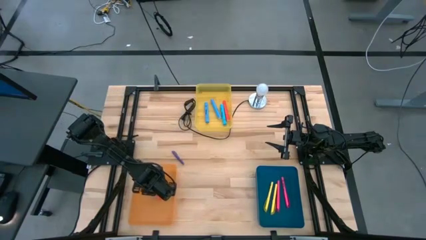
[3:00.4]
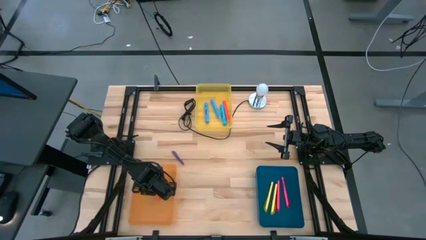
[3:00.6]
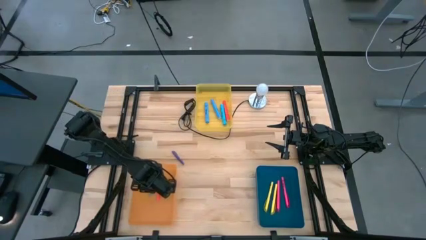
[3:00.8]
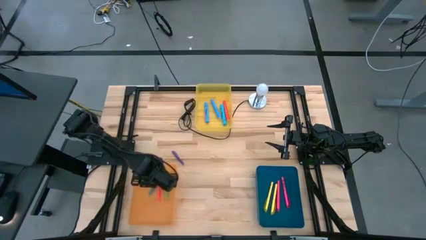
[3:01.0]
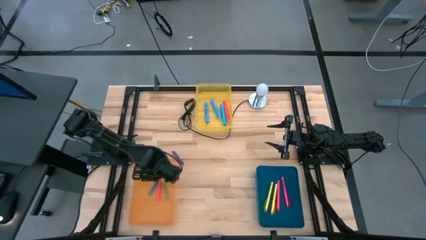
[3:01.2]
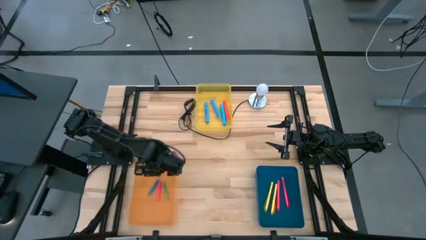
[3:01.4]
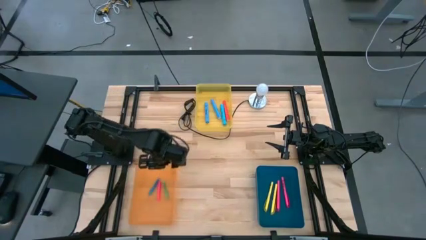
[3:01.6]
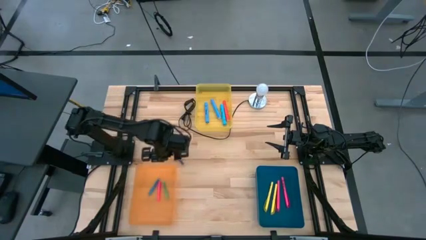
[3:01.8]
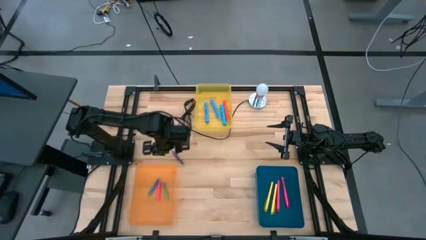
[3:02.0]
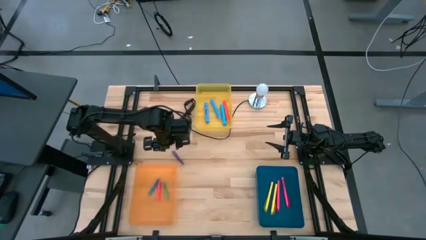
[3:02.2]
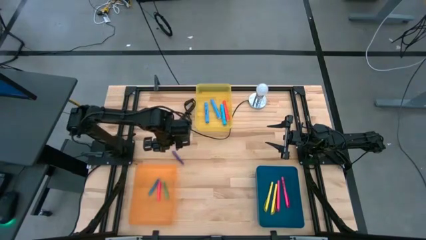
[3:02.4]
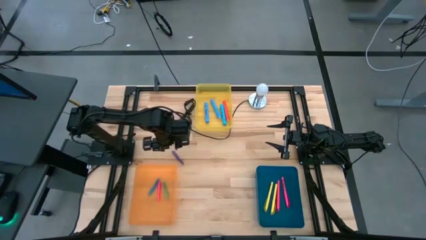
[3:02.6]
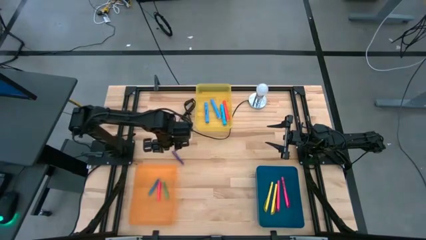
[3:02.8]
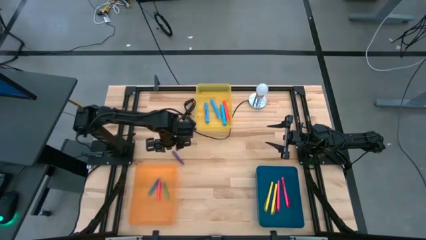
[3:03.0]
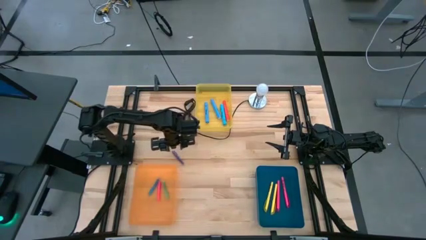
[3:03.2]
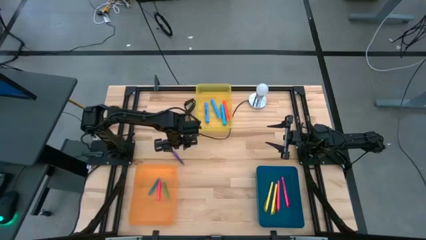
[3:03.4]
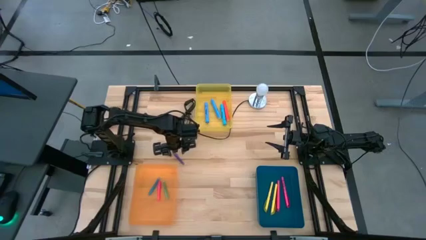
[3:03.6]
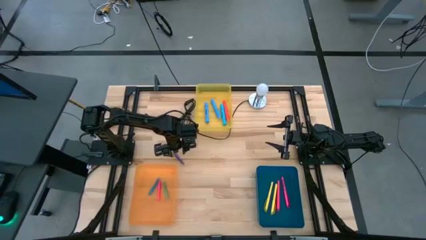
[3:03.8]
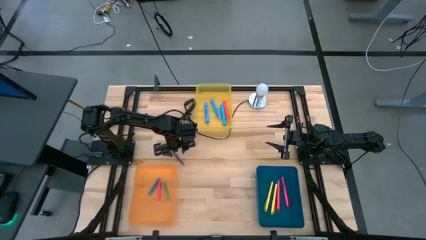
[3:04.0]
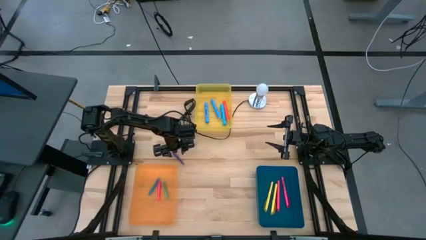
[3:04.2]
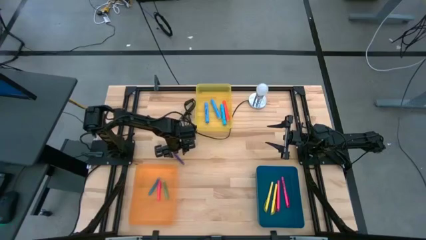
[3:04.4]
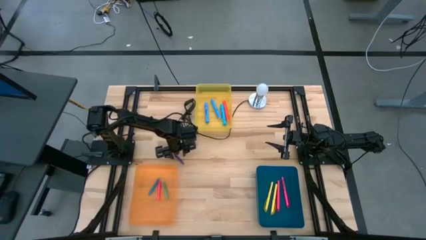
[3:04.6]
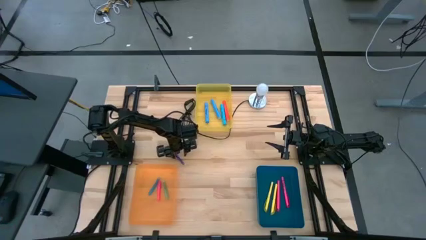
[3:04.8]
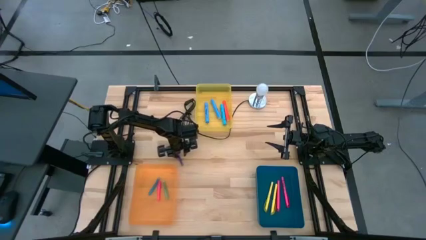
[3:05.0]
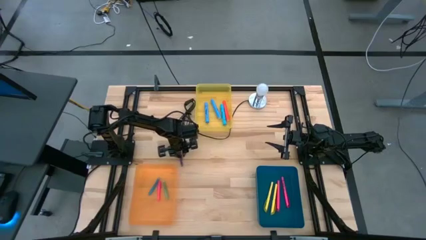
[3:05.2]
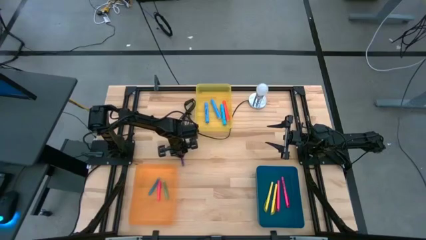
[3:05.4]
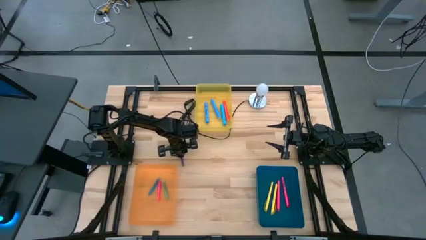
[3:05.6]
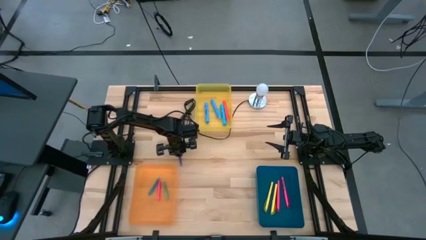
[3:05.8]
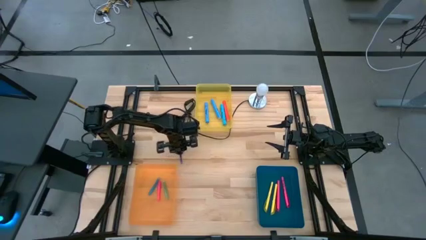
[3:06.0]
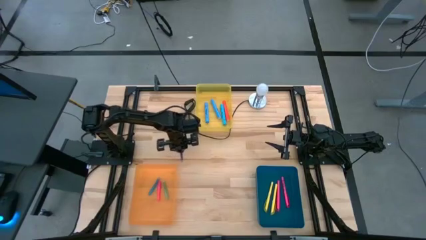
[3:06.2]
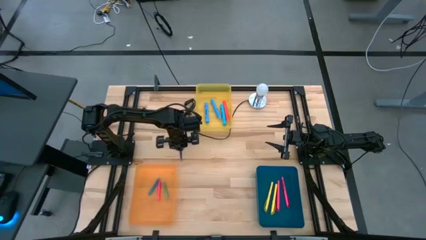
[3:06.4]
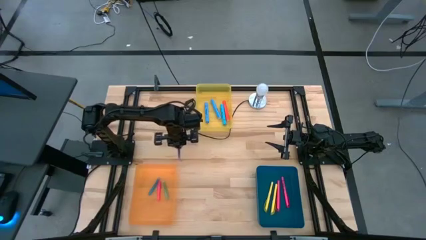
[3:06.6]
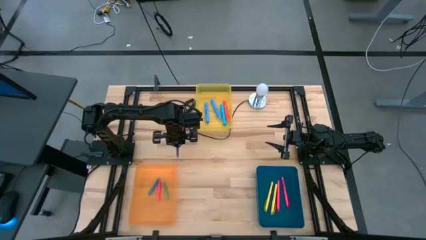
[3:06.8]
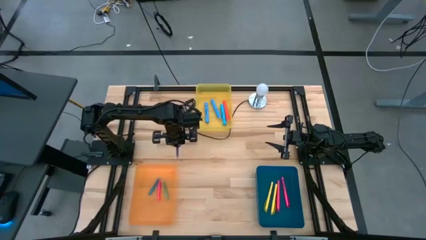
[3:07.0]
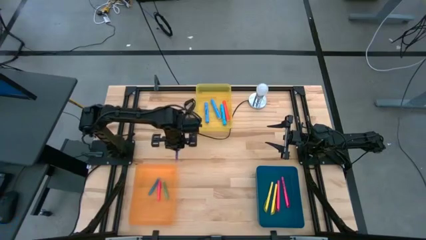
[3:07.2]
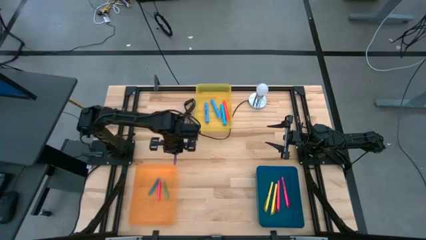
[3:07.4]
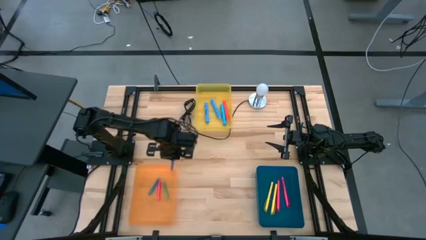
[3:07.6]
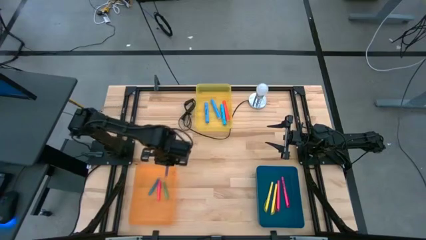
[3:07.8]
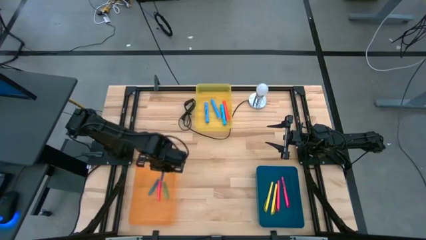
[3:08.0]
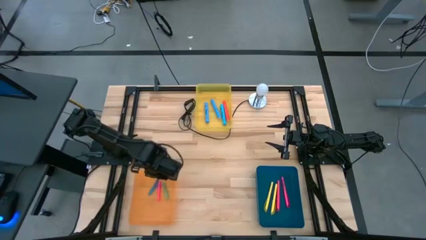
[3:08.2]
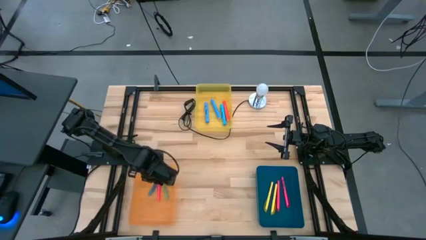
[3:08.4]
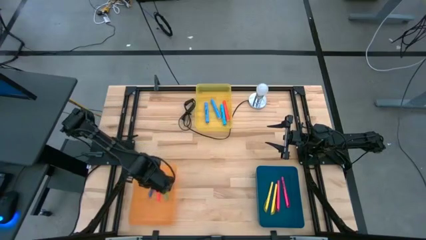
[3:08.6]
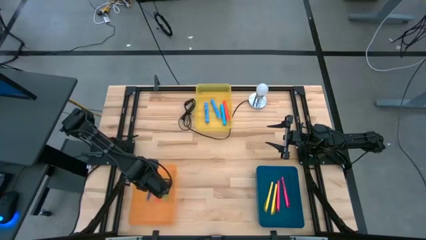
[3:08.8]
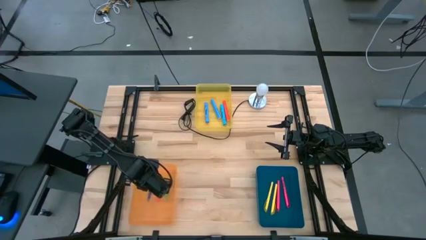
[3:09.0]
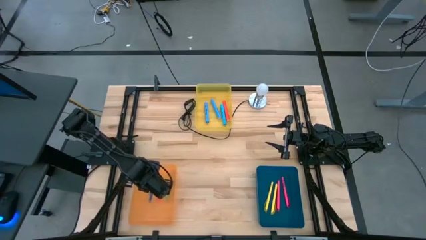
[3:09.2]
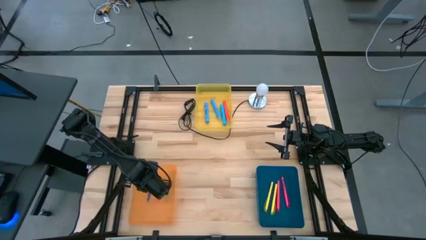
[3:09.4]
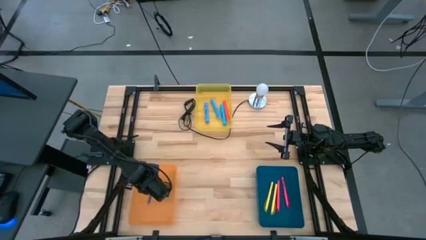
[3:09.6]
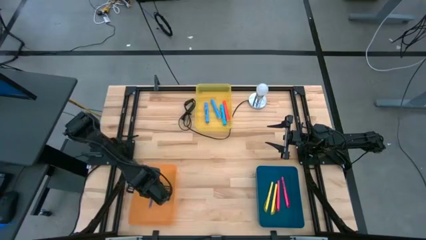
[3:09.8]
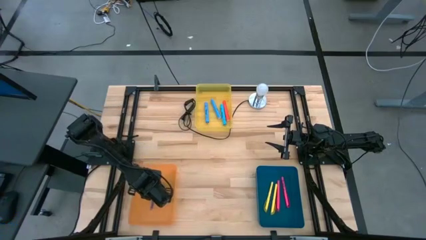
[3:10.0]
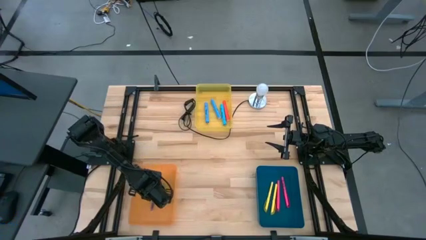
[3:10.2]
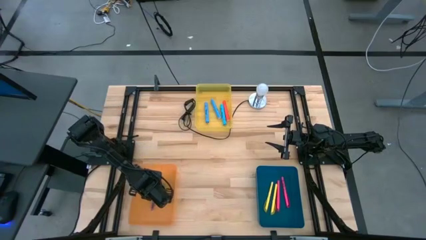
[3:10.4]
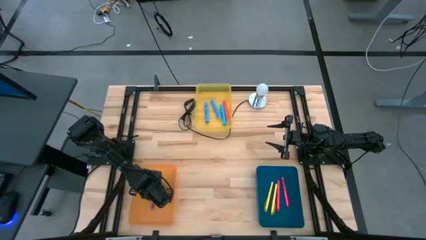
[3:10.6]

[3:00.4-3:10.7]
Task: Pick & Place Markers
Put the purple pen into the orange bin

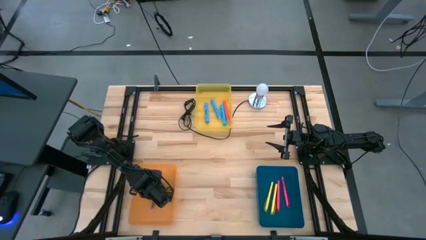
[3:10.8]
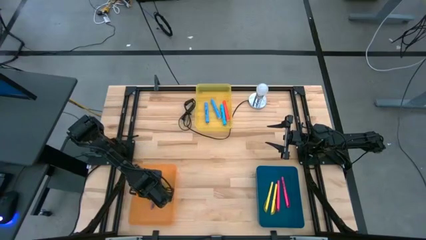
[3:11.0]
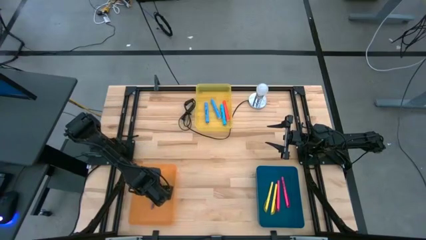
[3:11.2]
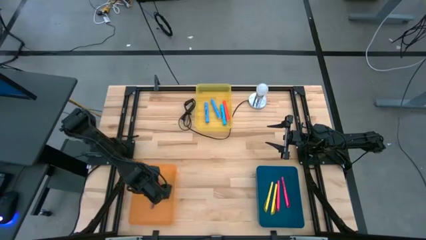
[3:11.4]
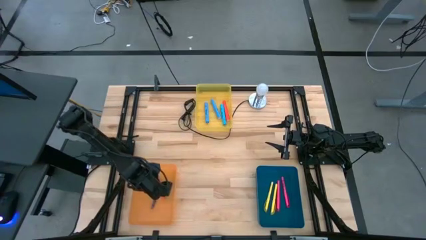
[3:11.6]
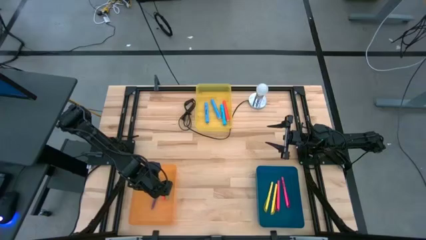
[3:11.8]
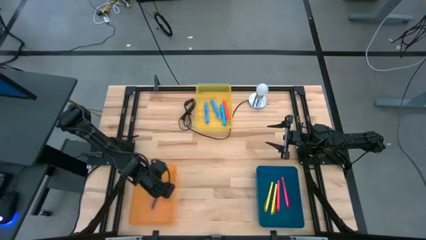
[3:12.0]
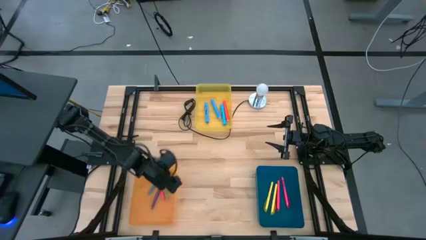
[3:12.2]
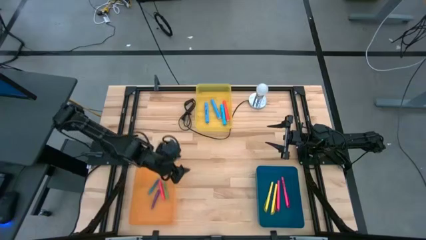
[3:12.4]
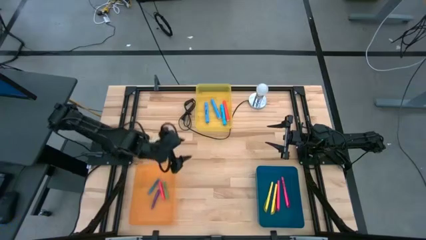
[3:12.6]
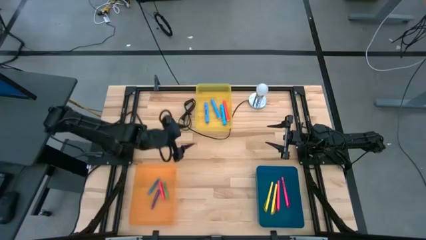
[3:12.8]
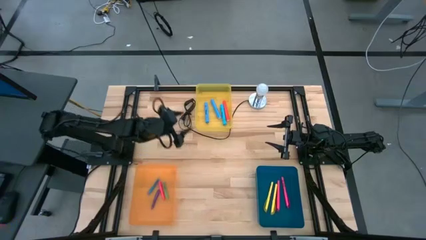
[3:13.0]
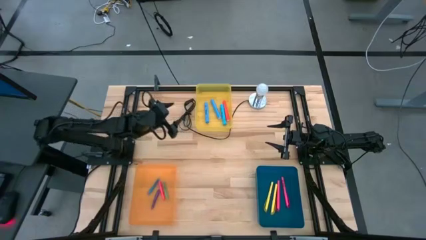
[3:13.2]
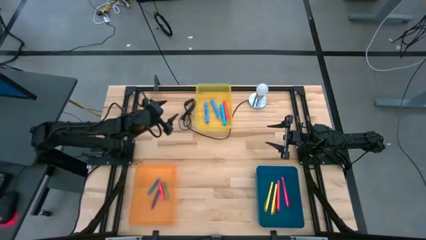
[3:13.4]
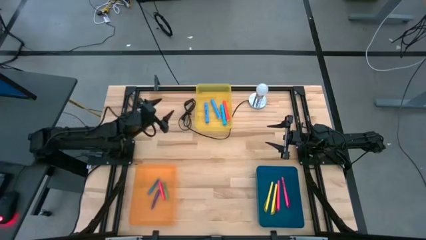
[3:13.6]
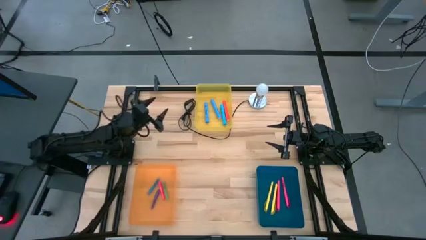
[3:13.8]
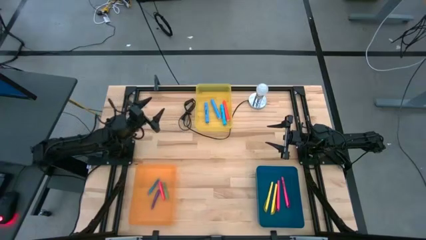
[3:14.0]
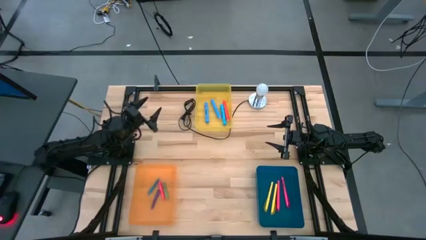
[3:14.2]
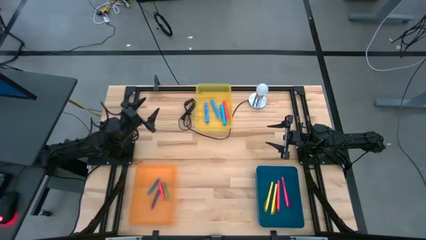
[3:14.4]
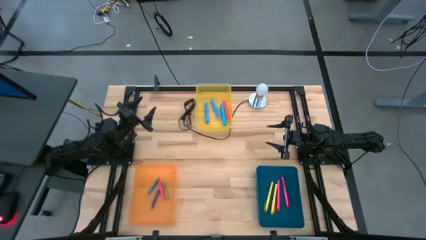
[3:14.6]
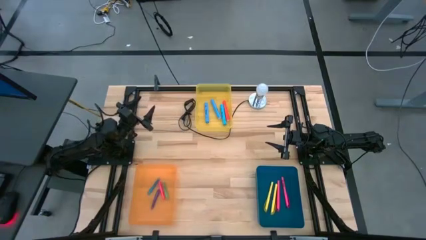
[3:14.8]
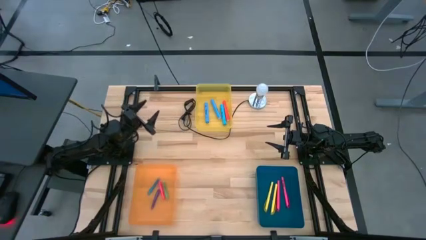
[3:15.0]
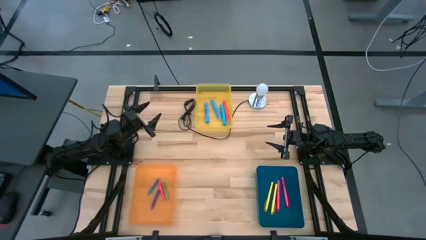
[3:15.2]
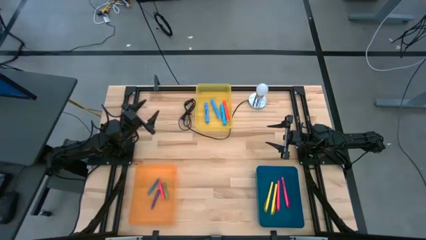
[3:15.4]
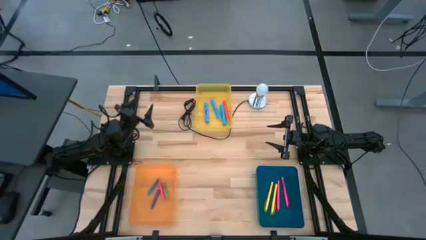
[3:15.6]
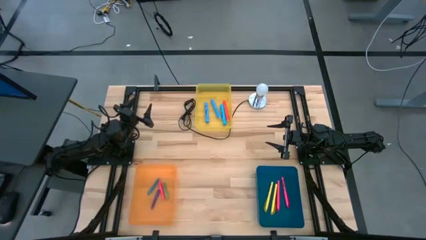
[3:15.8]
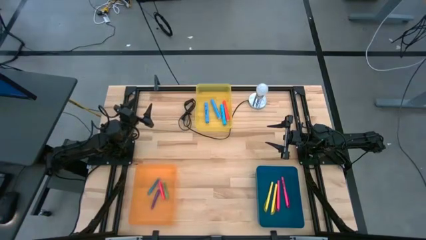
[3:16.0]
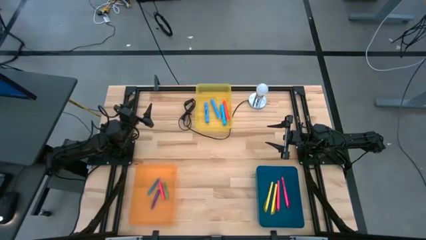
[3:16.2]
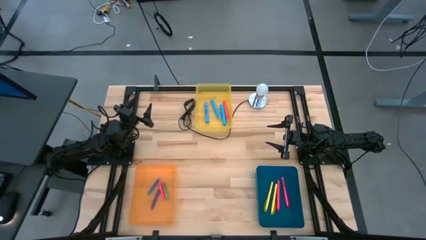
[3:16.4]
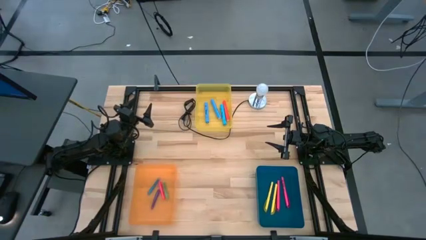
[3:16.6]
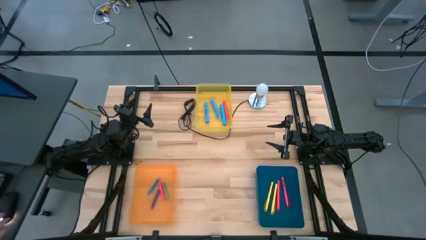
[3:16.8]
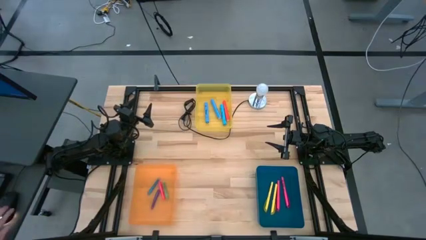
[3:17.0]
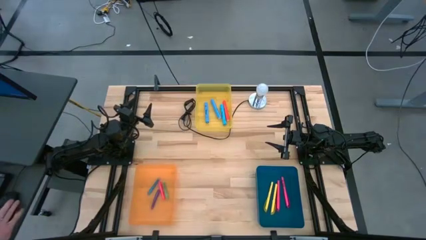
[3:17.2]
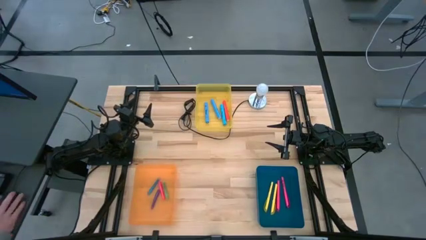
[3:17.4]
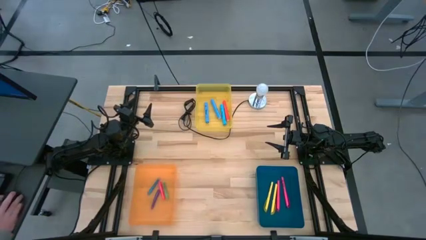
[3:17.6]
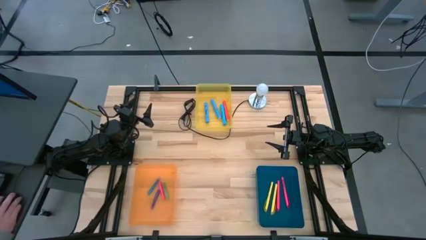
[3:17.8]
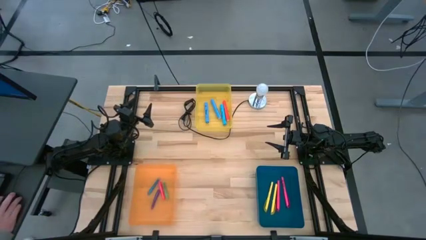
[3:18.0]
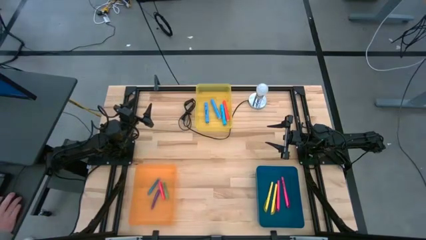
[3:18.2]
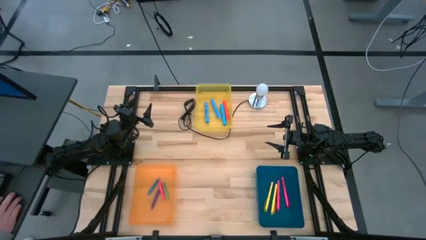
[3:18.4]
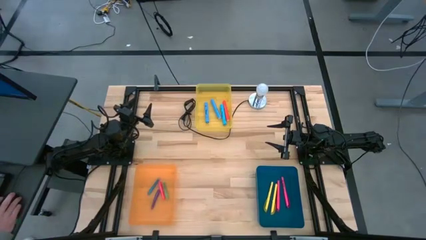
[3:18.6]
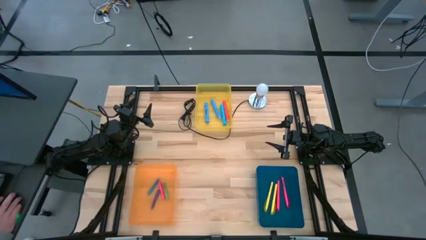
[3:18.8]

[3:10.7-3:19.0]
Return to Home Position
